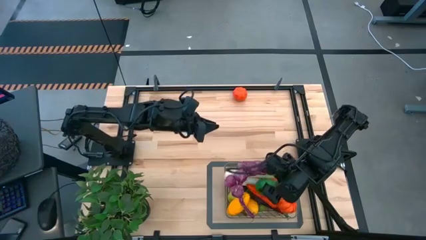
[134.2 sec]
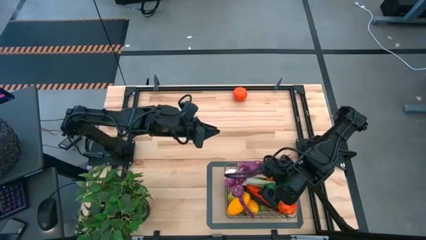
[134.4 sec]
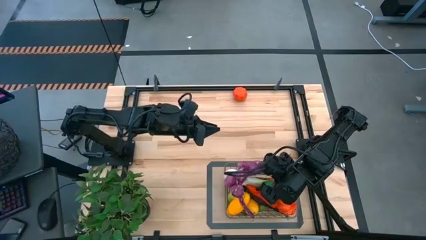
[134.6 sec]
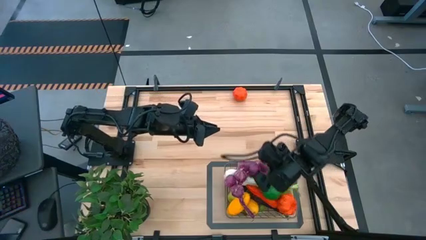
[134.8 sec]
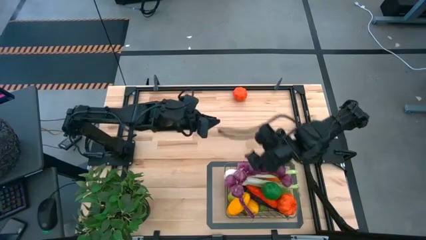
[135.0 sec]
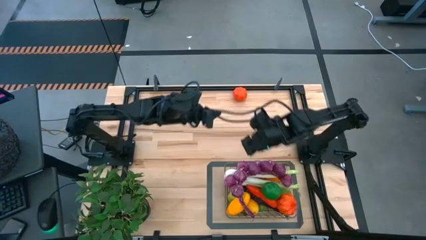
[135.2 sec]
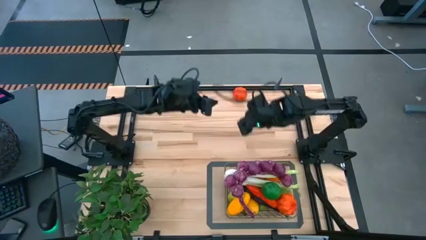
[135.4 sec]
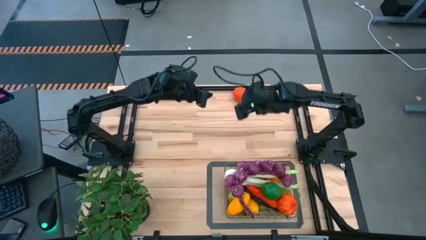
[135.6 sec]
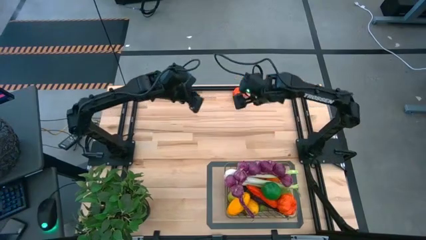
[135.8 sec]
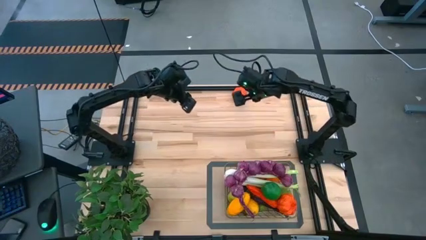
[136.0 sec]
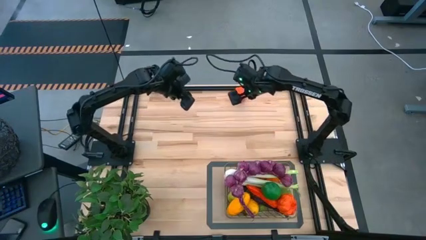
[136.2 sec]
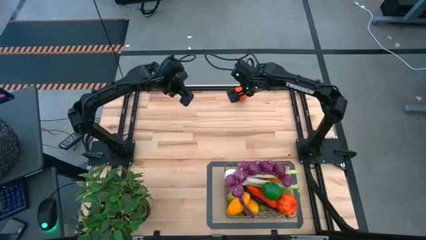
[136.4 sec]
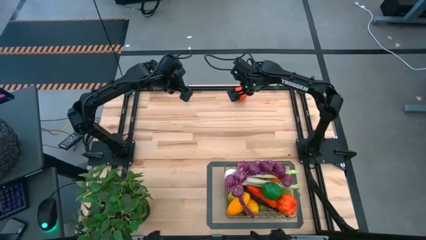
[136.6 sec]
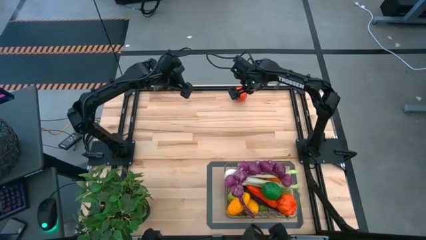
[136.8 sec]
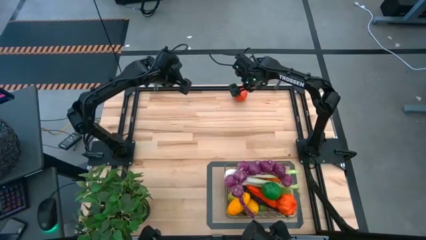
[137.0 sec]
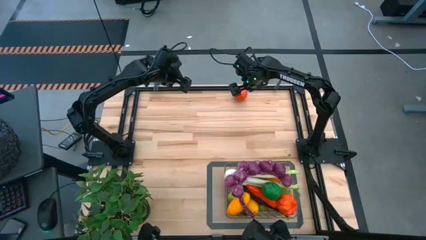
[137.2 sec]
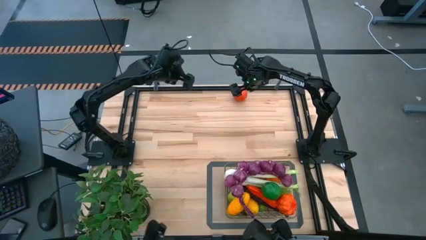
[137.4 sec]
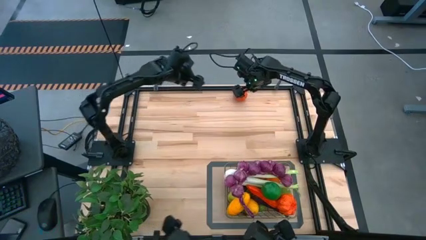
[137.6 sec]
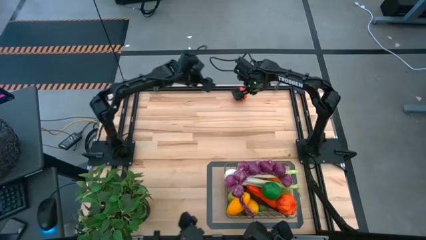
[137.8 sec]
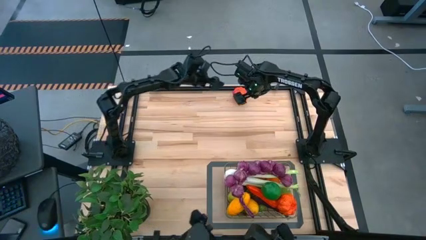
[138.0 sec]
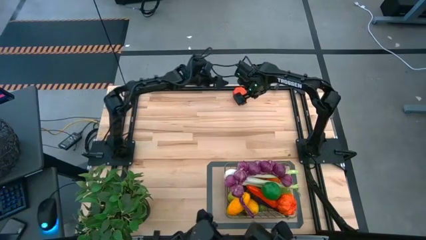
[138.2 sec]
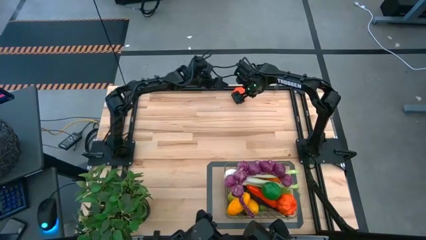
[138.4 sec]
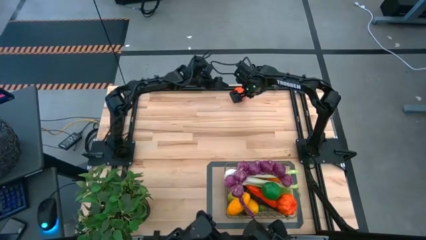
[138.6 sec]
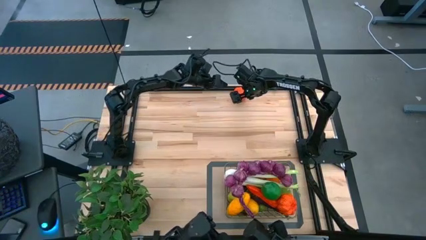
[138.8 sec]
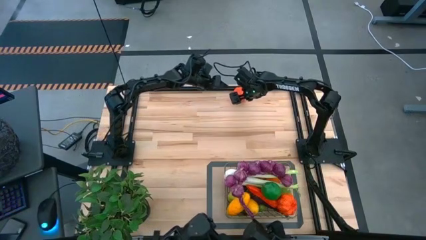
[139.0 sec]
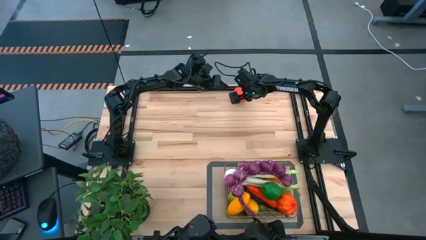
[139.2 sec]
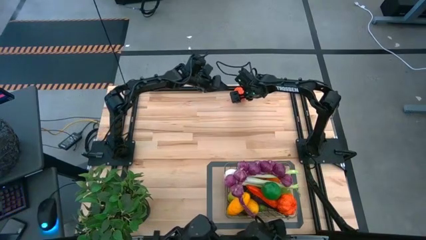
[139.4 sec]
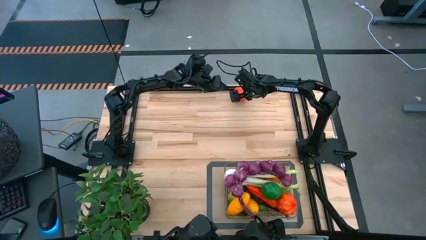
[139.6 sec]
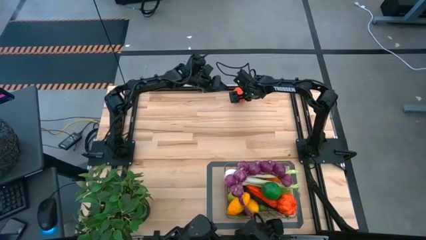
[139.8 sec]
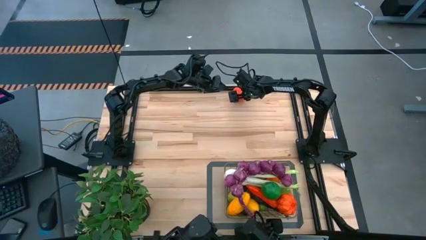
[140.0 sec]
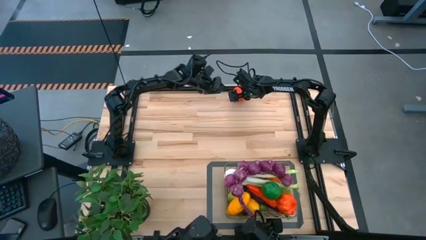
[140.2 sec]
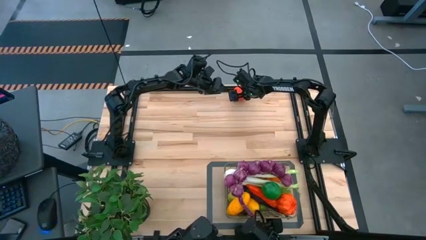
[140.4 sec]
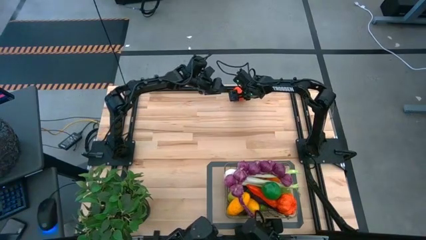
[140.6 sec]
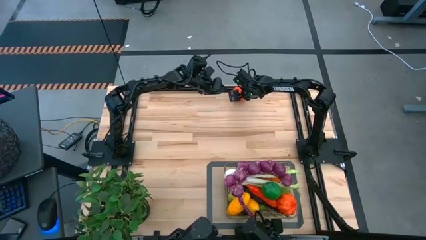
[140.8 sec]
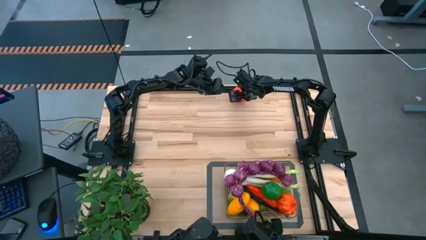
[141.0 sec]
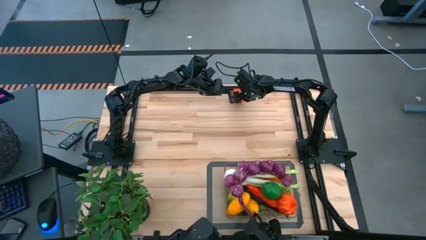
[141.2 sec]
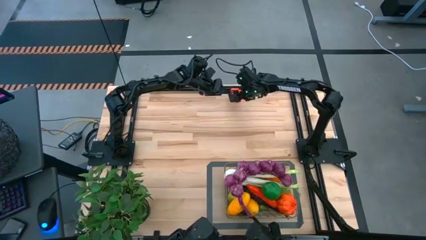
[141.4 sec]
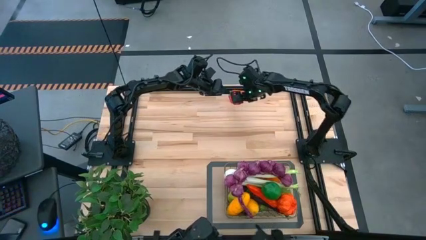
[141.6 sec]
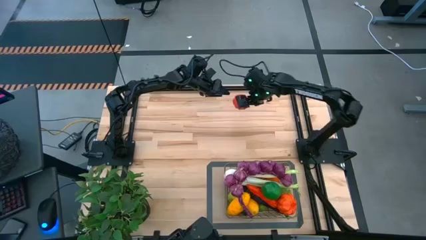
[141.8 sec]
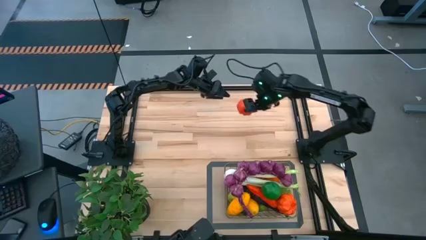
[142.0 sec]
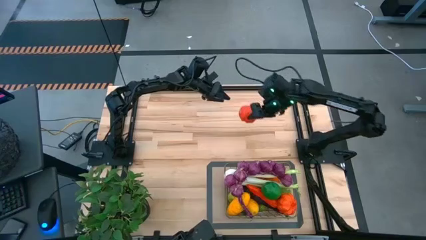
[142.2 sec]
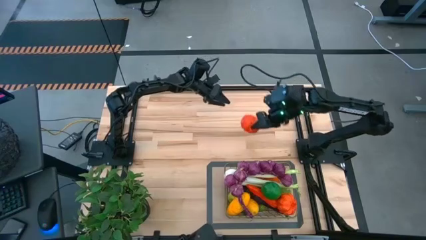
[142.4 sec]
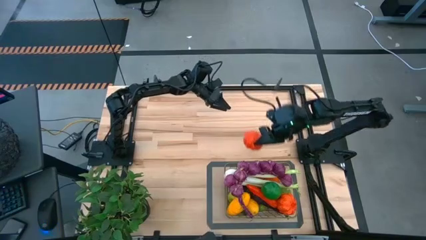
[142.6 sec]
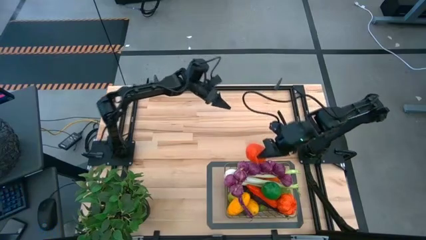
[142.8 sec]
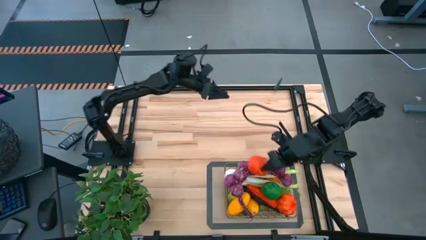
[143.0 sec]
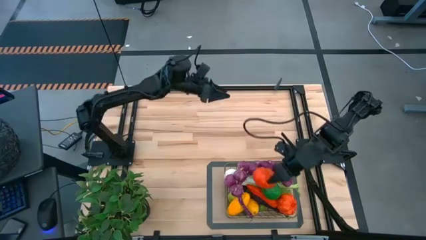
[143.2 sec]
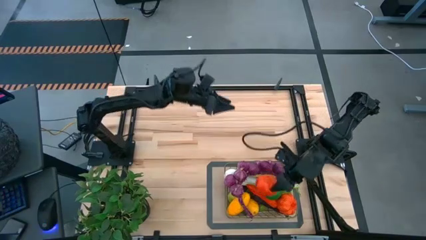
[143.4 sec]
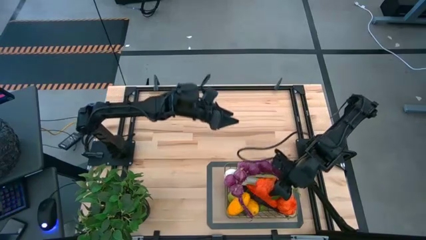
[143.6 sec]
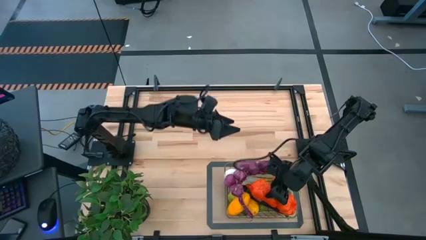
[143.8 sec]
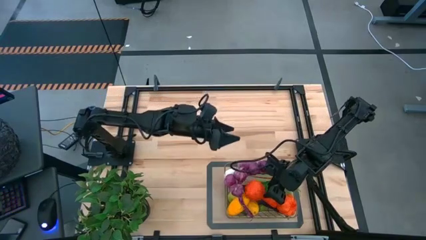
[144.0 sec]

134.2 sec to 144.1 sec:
Task: Build produce basket
Put the tangerine into the wire basket
